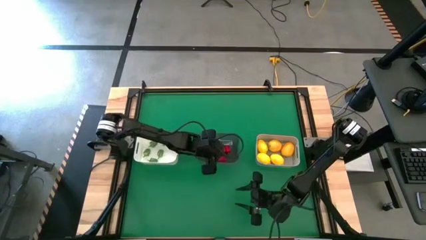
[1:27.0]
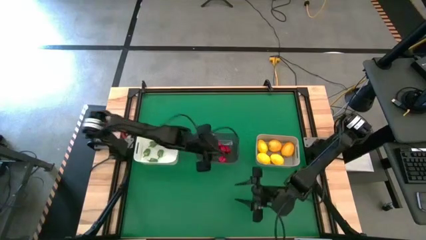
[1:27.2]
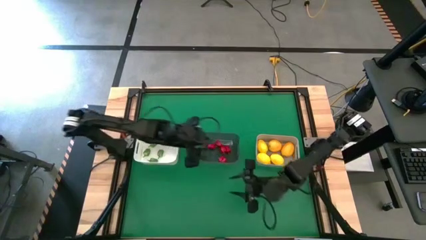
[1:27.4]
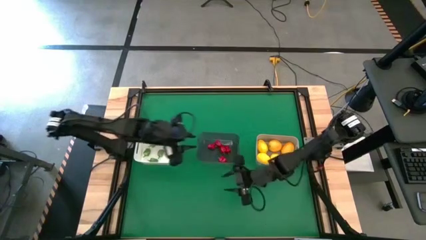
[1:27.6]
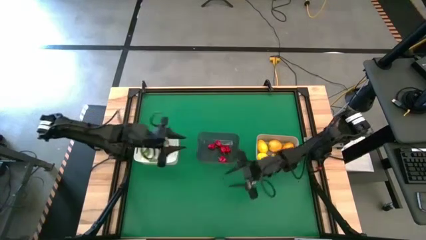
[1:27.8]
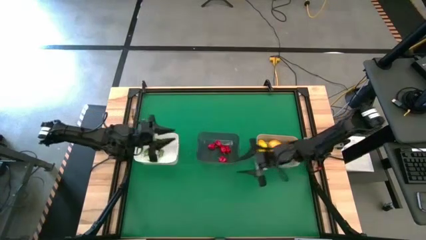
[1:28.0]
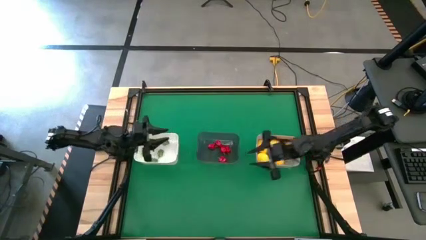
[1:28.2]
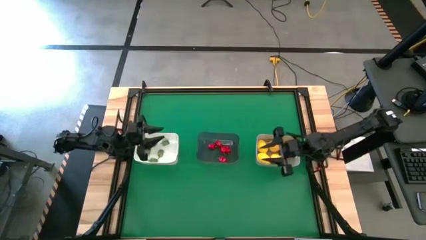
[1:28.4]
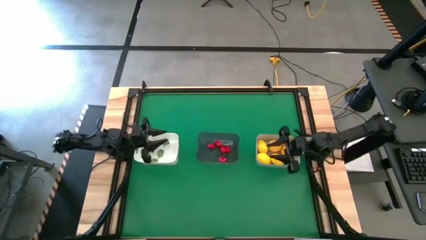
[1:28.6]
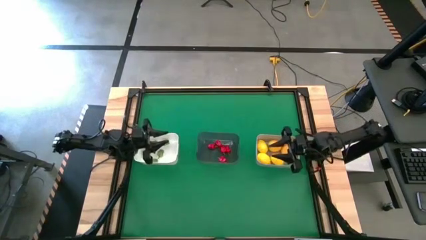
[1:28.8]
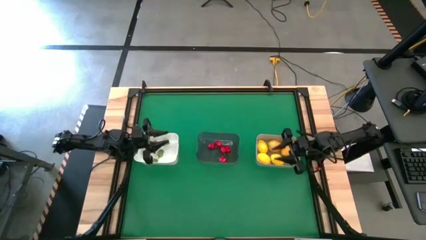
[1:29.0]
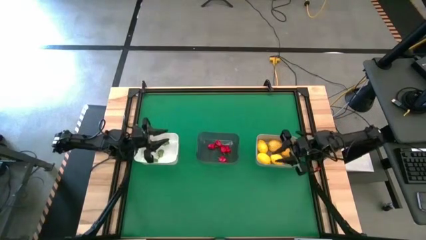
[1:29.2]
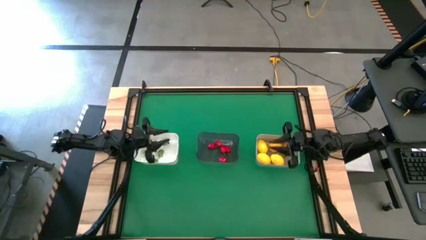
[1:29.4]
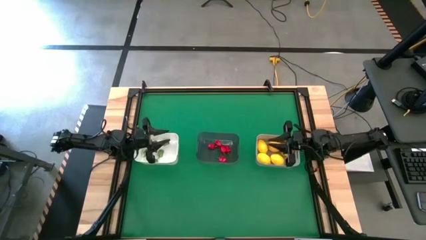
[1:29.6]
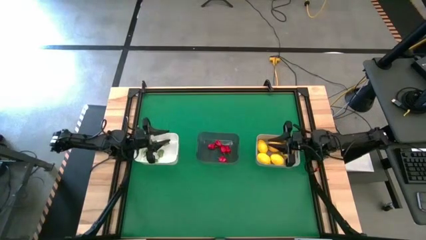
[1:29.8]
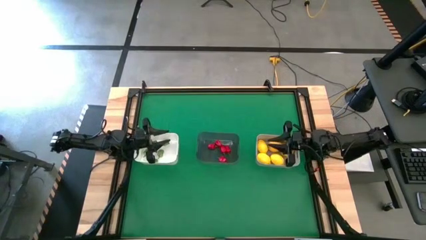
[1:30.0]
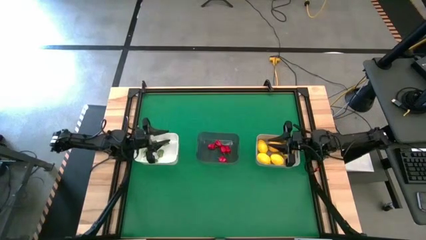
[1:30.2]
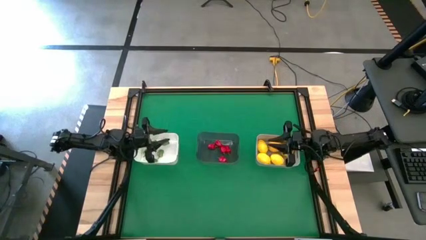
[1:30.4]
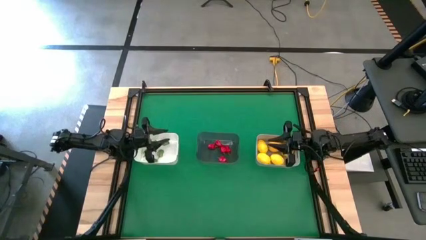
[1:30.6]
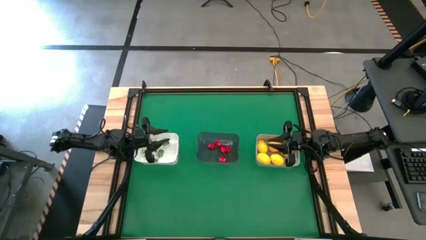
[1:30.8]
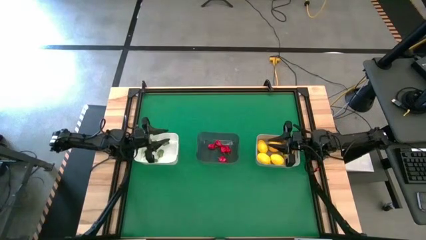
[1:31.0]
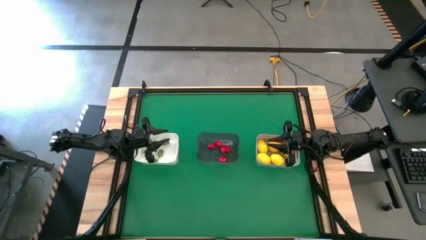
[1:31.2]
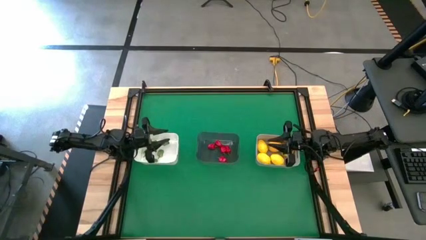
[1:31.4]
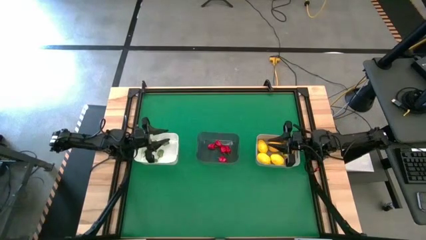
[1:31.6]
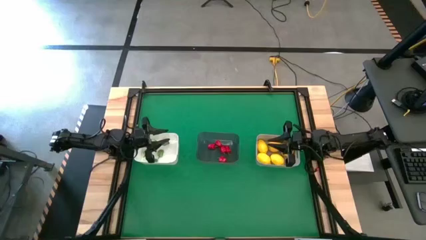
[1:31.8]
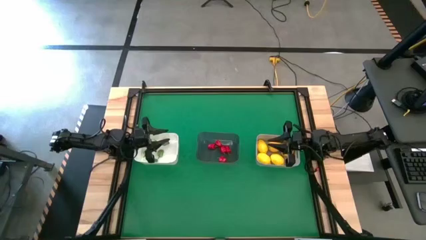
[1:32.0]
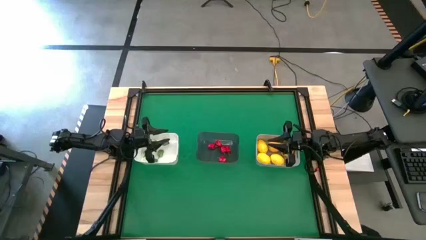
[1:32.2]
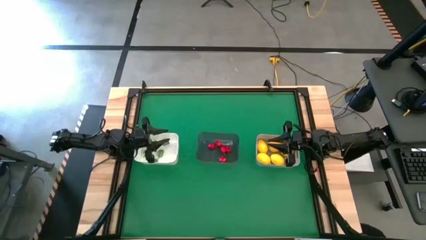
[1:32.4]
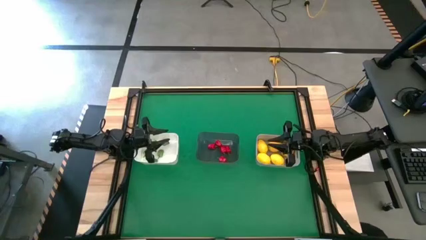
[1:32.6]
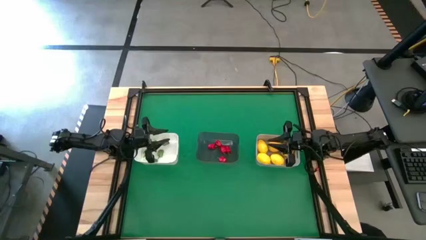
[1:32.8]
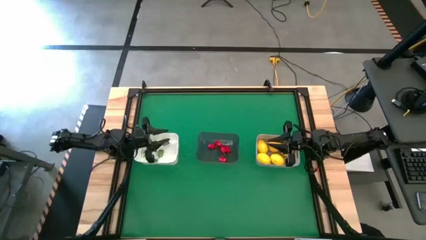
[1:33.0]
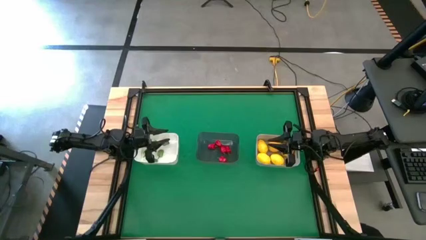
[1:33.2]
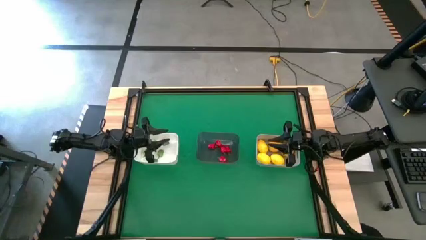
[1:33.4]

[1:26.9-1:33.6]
Task: Sort produce into baskets
Return to Home Position

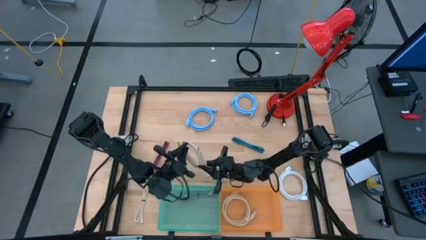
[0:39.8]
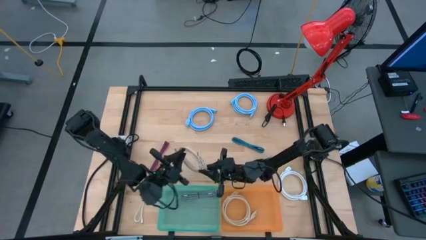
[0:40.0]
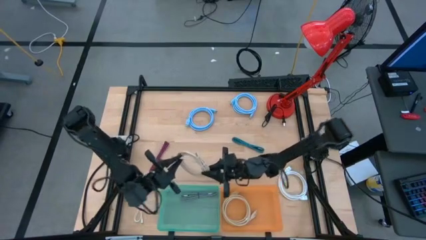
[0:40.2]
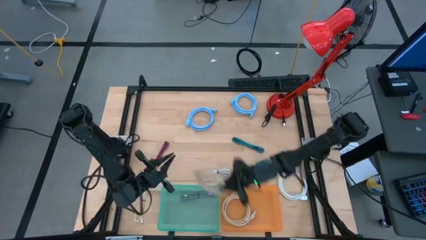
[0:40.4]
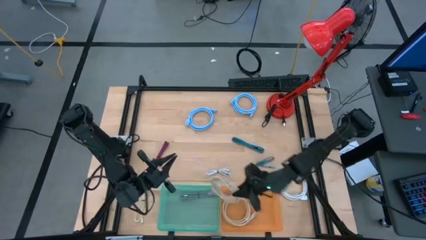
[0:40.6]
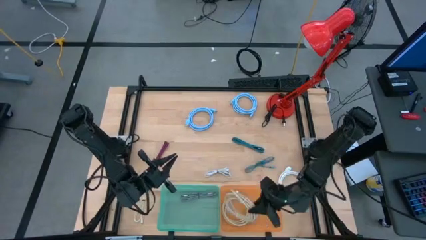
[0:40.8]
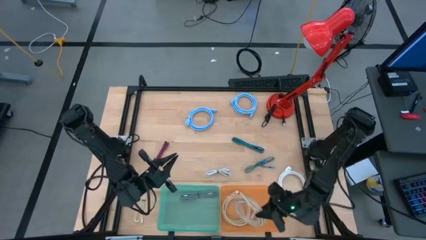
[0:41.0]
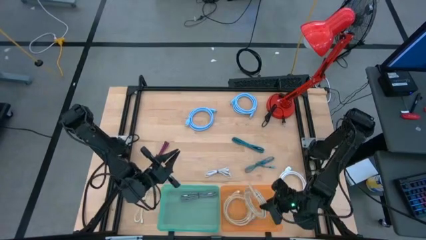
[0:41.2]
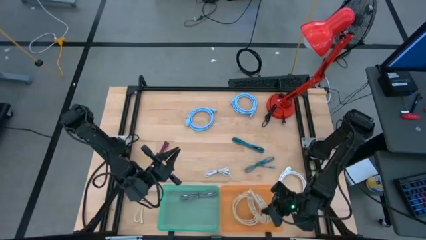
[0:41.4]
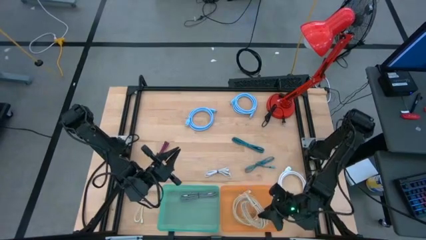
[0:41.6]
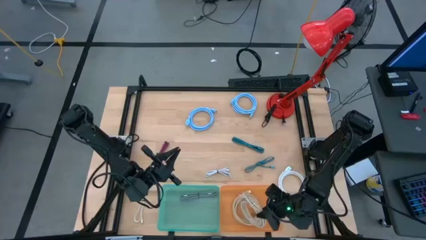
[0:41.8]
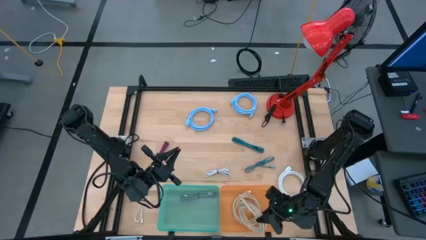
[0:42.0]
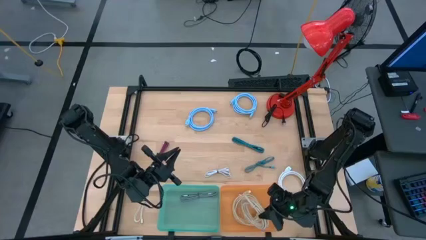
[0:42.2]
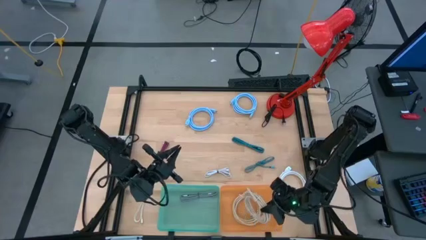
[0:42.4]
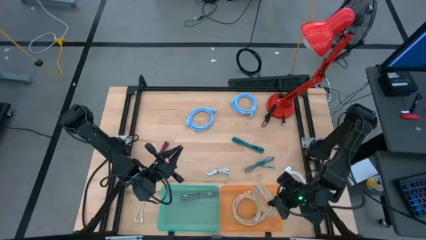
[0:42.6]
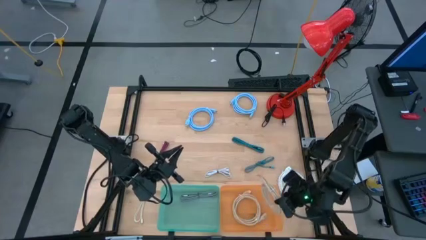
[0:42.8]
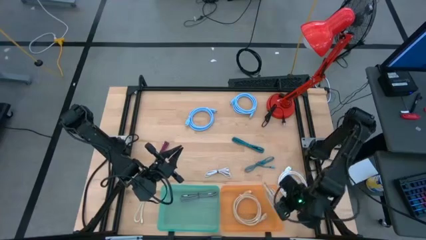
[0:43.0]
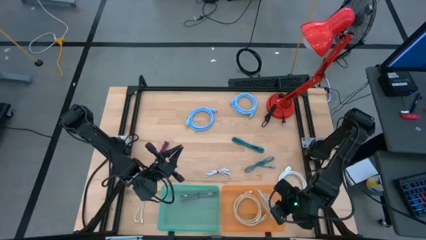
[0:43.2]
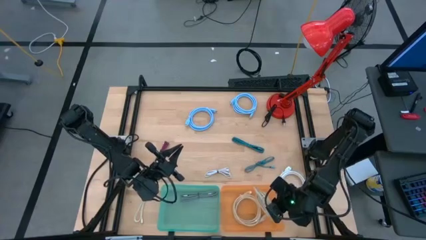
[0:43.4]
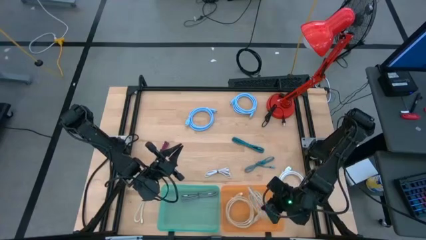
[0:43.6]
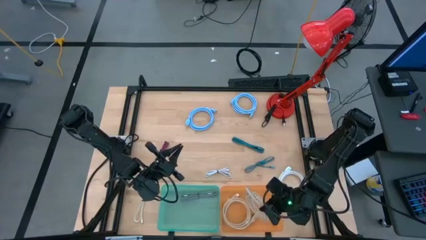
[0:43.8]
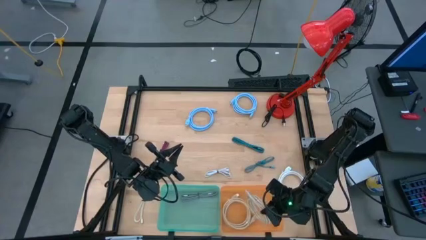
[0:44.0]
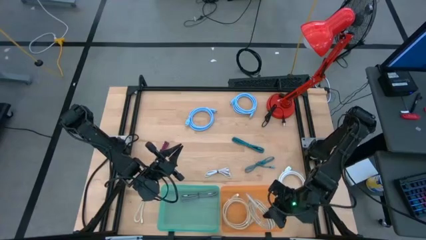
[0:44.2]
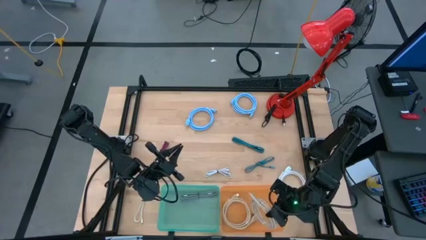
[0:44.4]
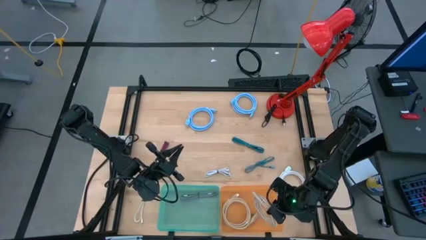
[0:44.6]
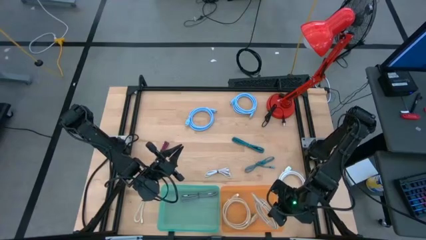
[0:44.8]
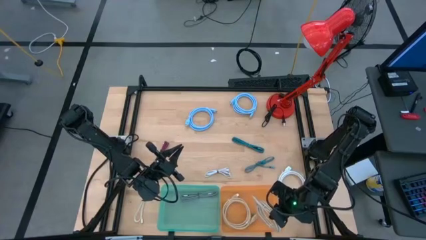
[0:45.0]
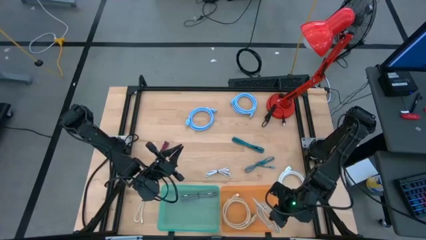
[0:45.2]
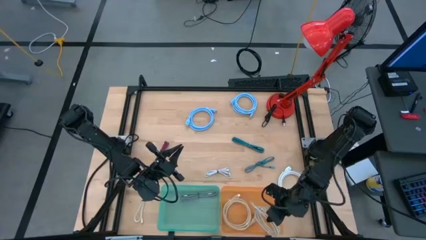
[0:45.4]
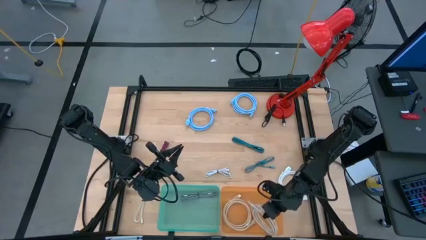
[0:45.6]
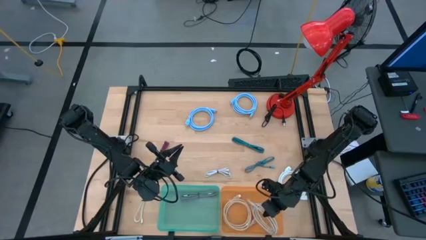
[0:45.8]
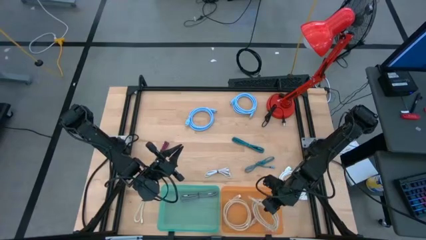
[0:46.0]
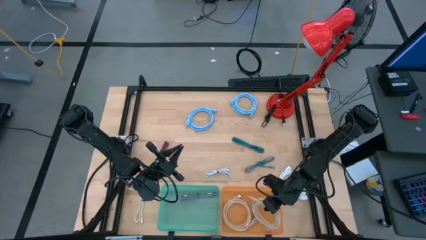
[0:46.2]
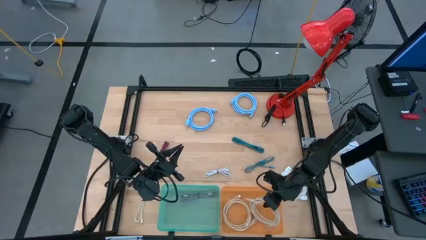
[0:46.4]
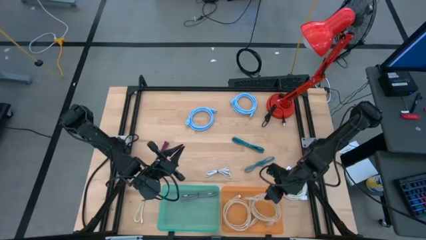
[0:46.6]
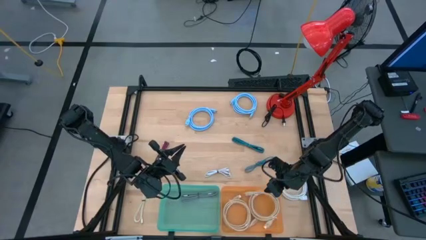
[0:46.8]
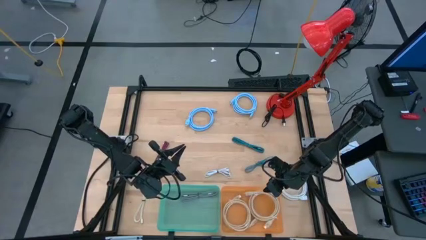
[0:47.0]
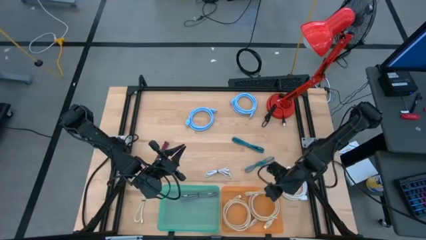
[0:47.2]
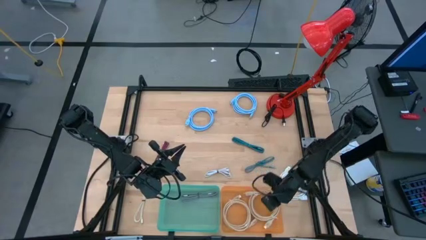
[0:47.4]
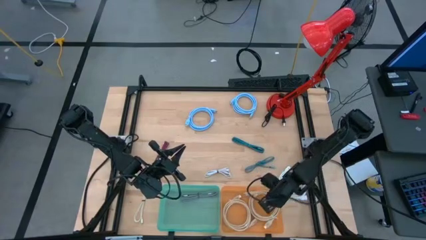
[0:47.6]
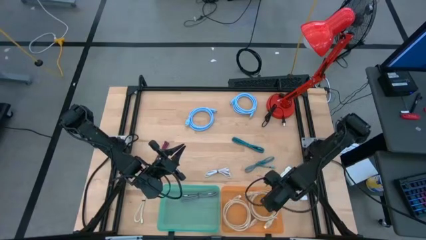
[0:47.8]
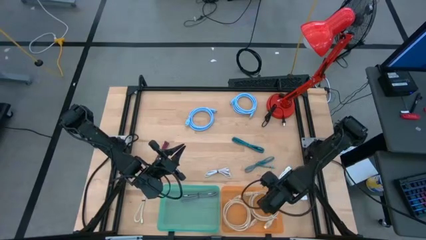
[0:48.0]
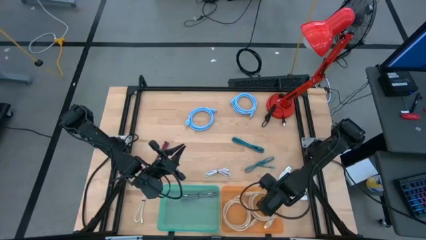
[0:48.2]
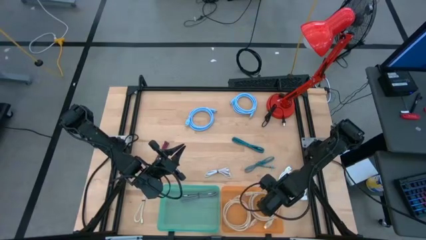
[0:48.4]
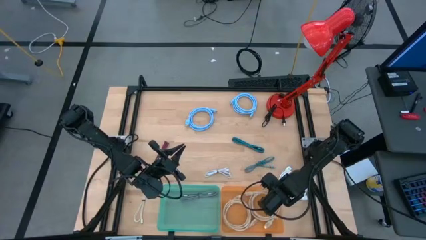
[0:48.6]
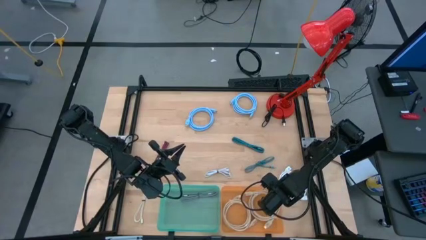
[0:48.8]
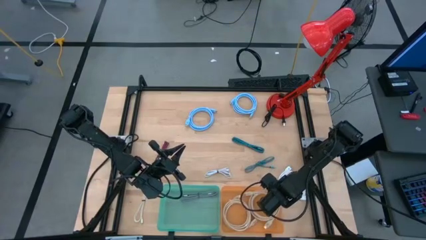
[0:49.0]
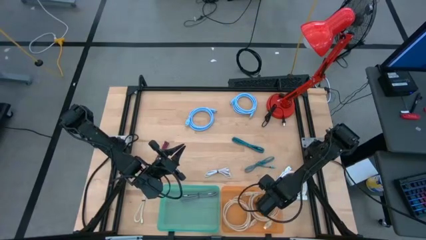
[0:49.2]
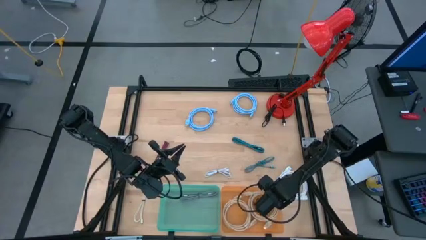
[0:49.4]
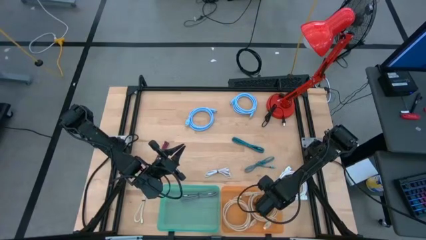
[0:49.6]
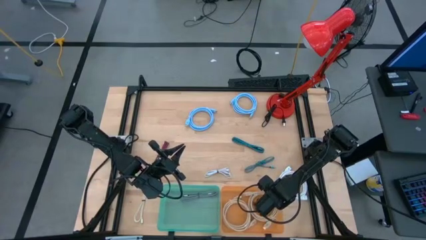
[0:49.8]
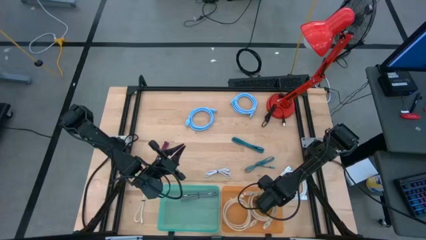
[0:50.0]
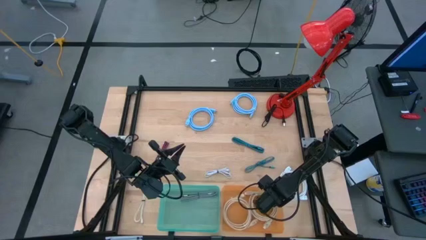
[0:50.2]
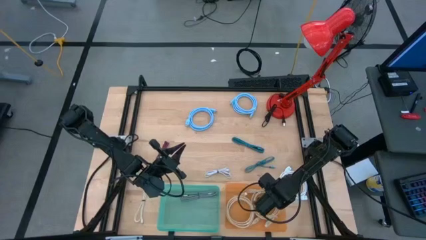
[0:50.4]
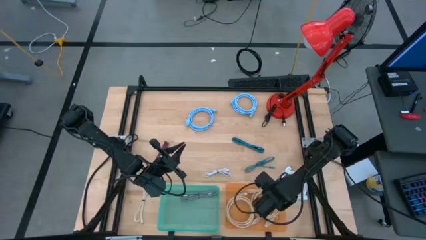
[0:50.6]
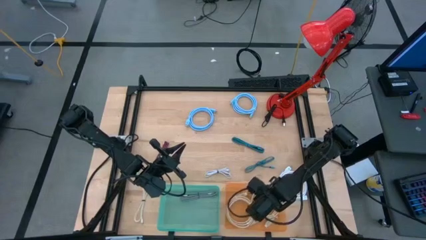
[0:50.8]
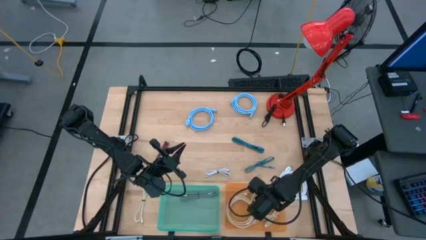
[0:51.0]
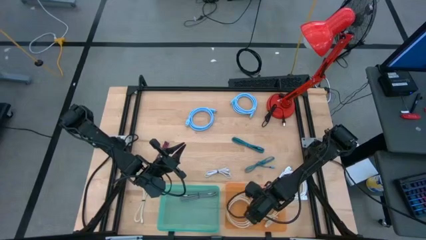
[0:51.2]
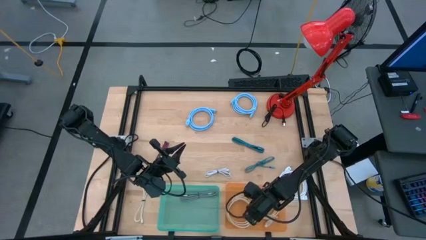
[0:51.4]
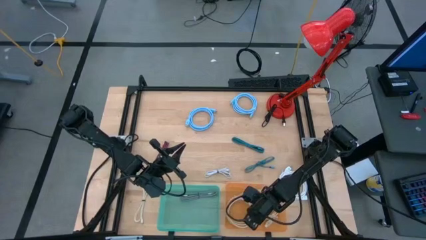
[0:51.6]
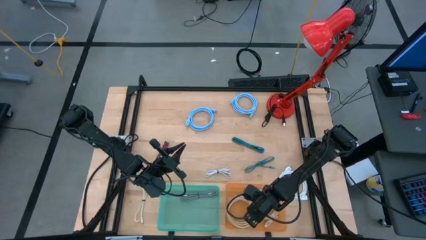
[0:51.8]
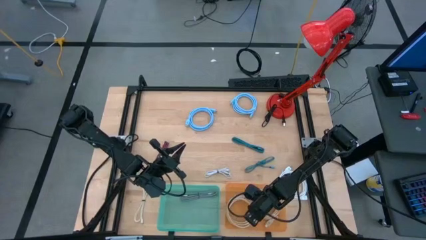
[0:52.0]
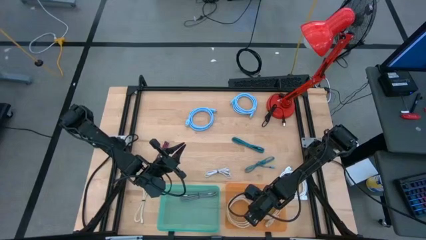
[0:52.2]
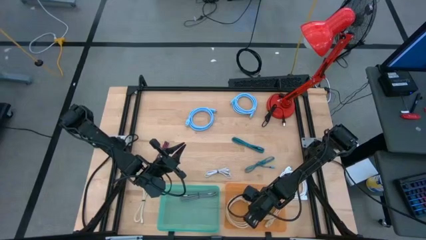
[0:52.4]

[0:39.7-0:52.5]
Task: Pick & Place USB Port
Put the light brown HDMI cable into the orange bin
